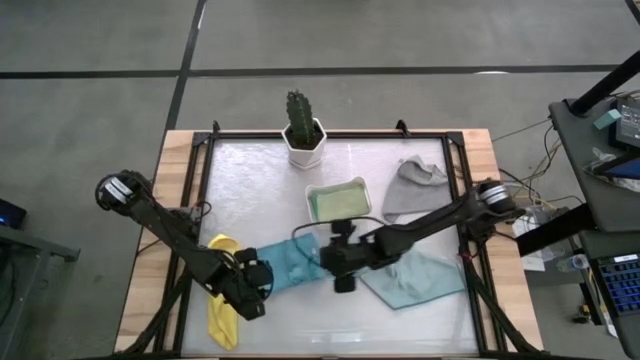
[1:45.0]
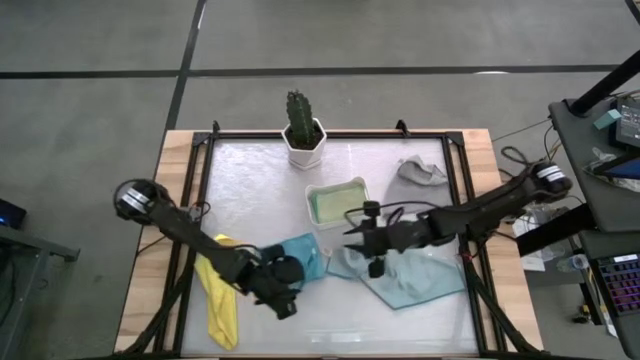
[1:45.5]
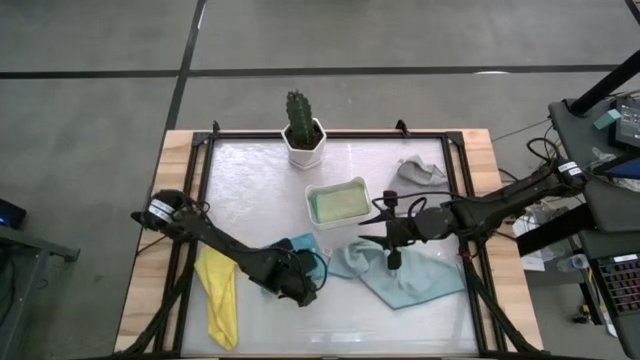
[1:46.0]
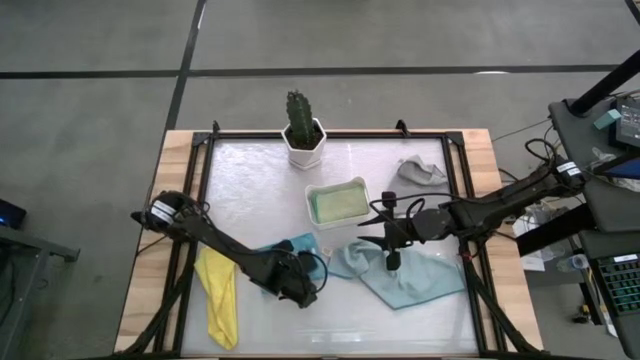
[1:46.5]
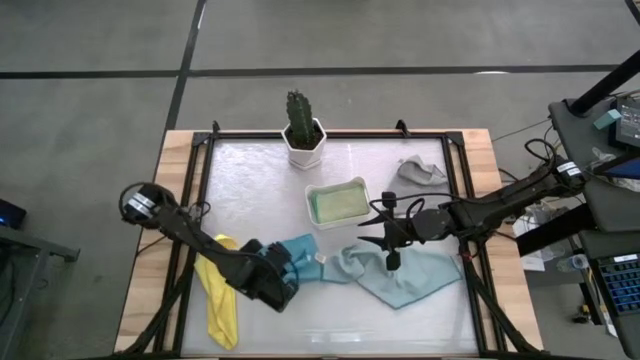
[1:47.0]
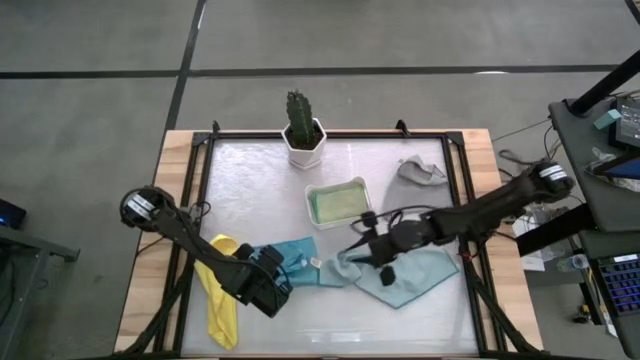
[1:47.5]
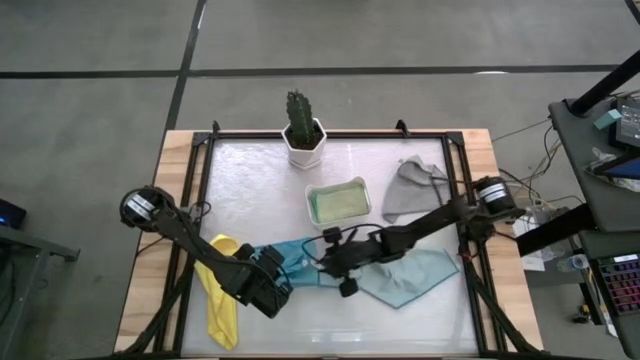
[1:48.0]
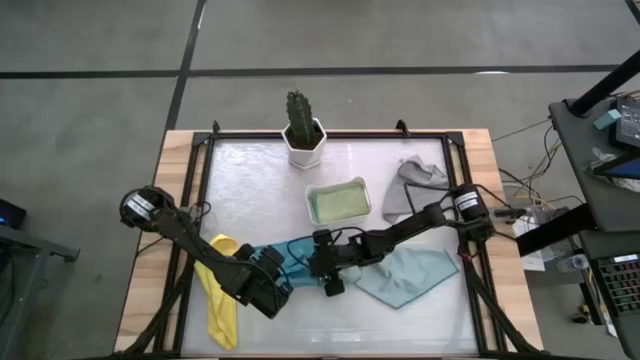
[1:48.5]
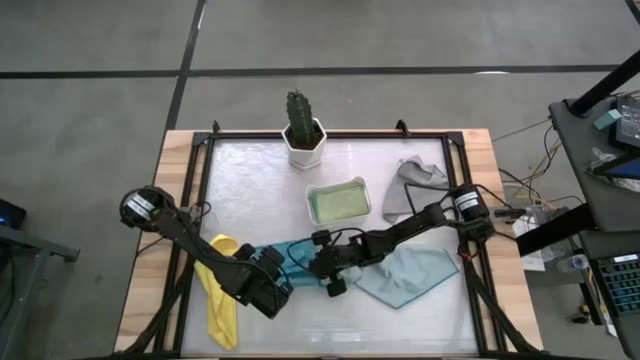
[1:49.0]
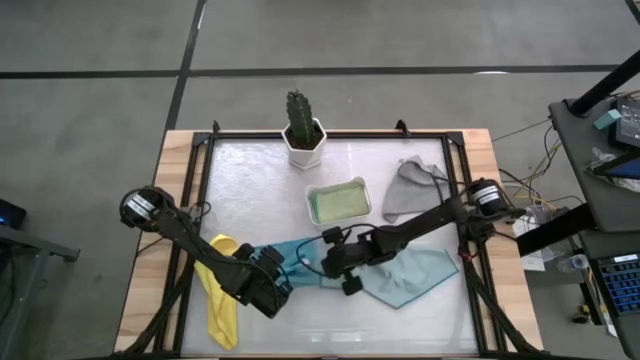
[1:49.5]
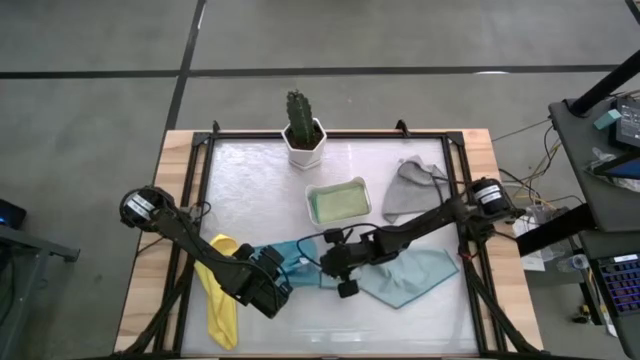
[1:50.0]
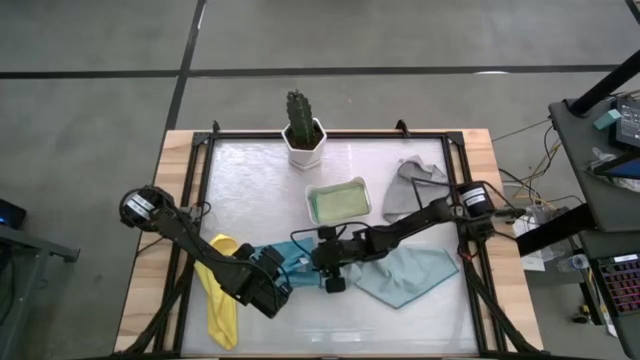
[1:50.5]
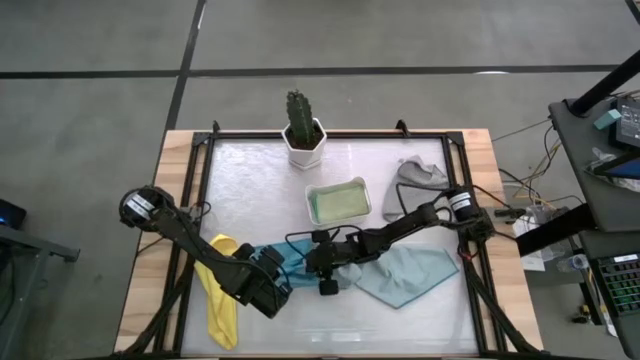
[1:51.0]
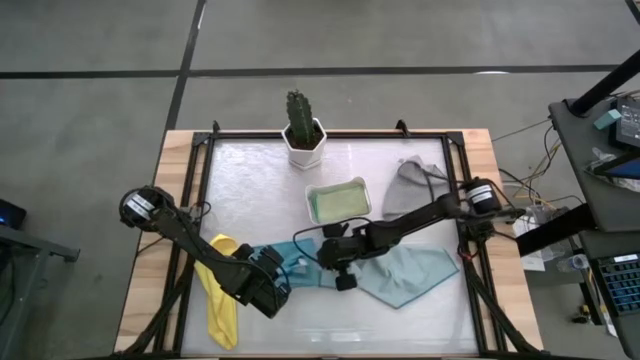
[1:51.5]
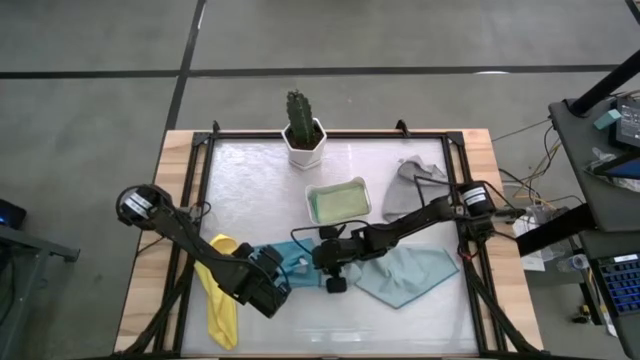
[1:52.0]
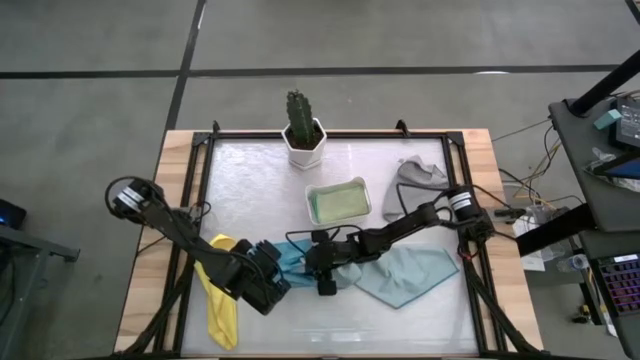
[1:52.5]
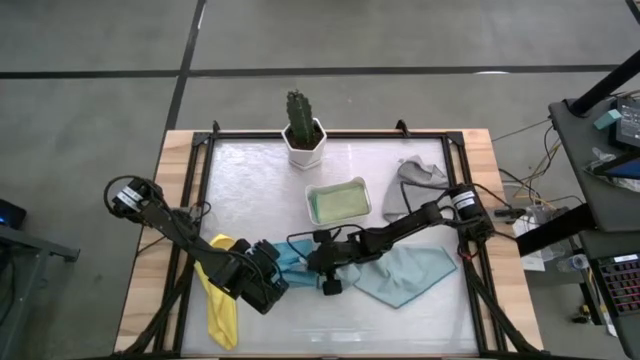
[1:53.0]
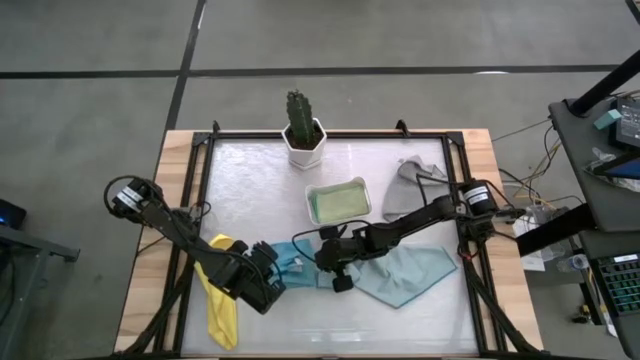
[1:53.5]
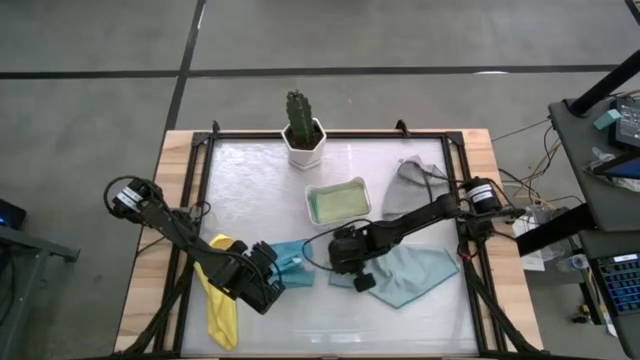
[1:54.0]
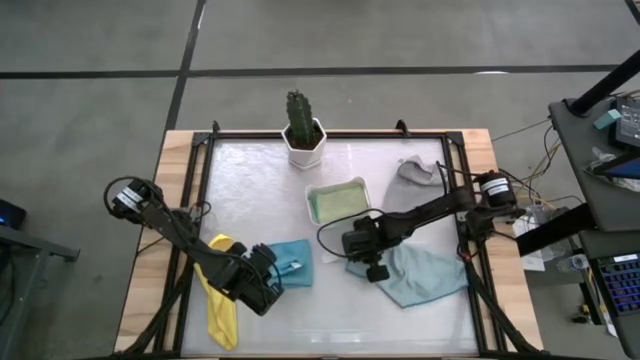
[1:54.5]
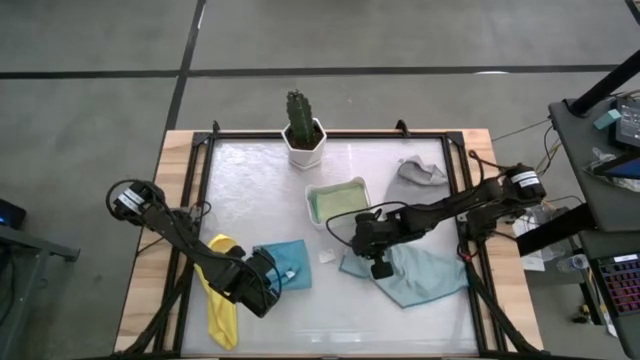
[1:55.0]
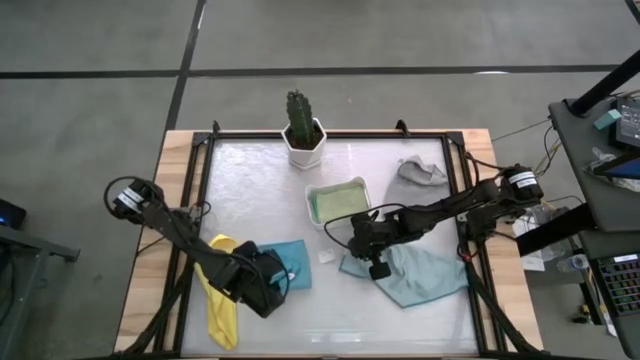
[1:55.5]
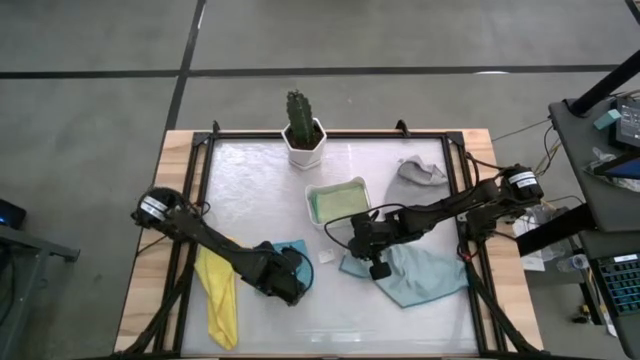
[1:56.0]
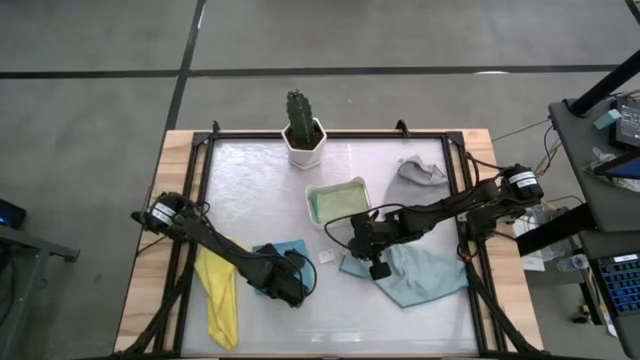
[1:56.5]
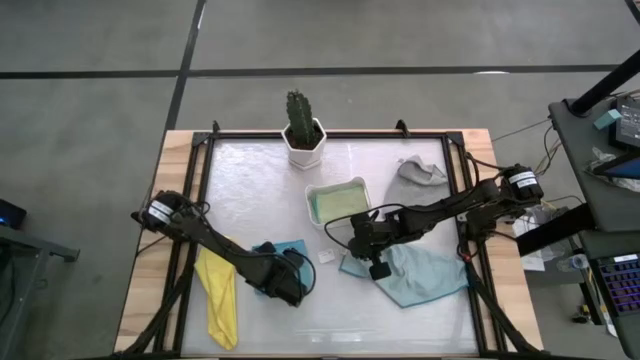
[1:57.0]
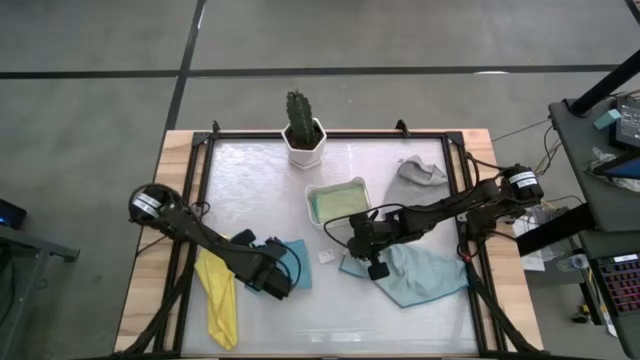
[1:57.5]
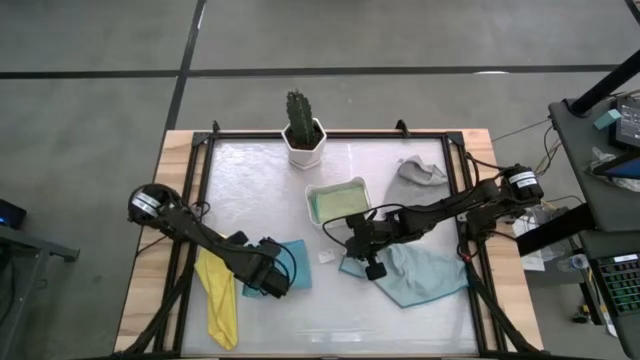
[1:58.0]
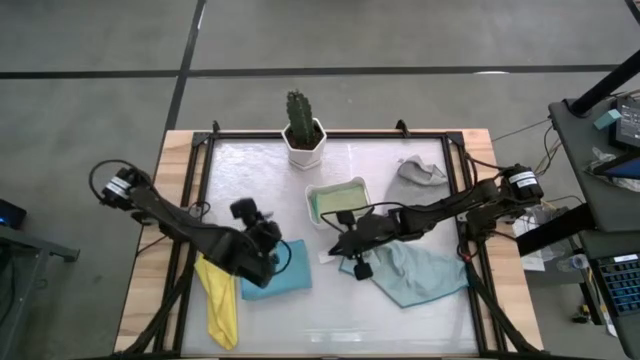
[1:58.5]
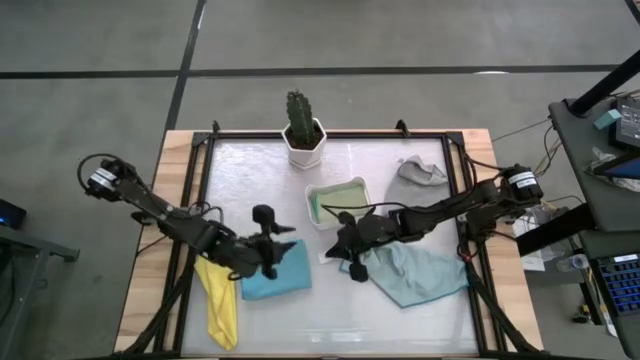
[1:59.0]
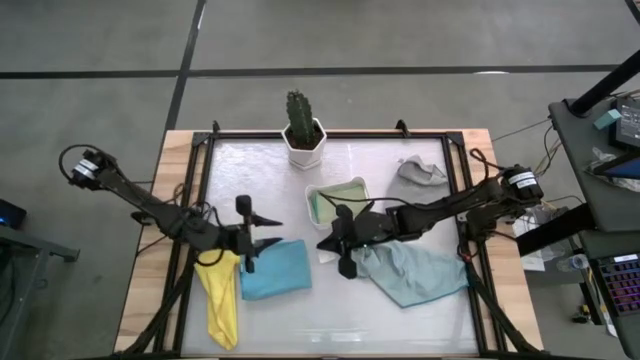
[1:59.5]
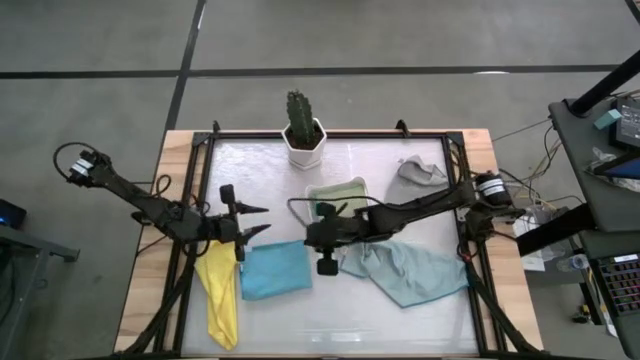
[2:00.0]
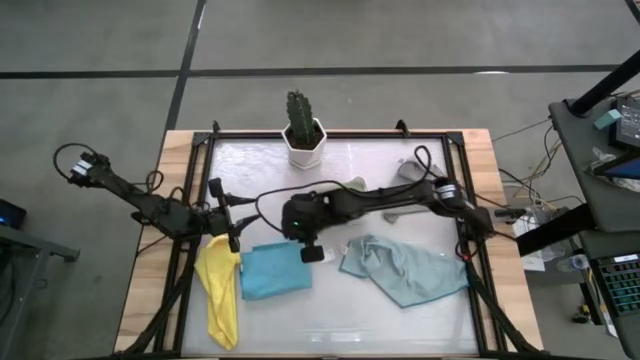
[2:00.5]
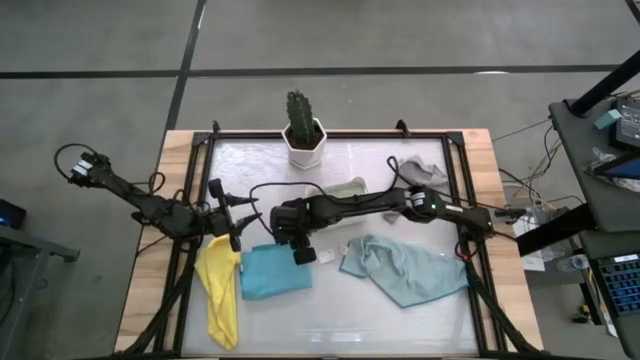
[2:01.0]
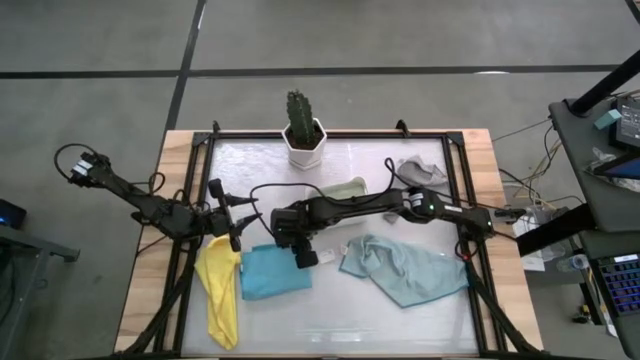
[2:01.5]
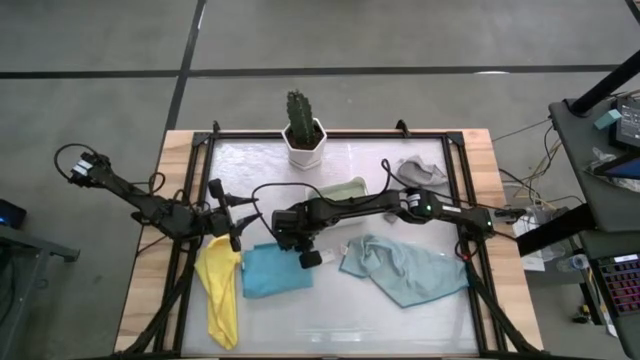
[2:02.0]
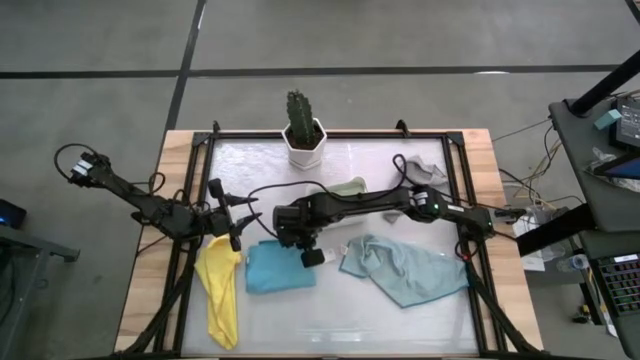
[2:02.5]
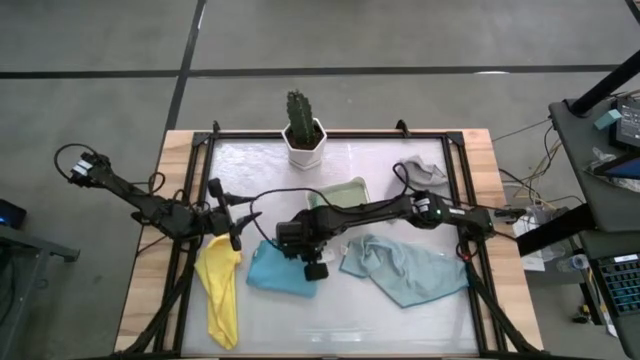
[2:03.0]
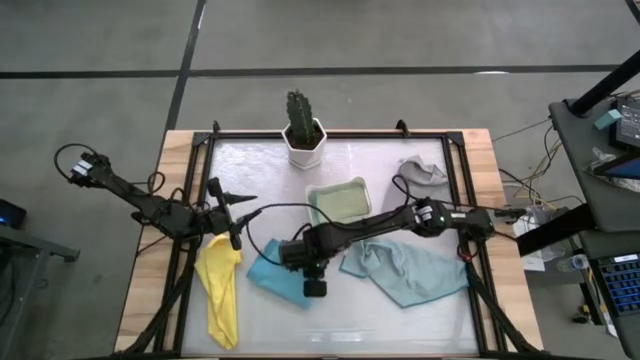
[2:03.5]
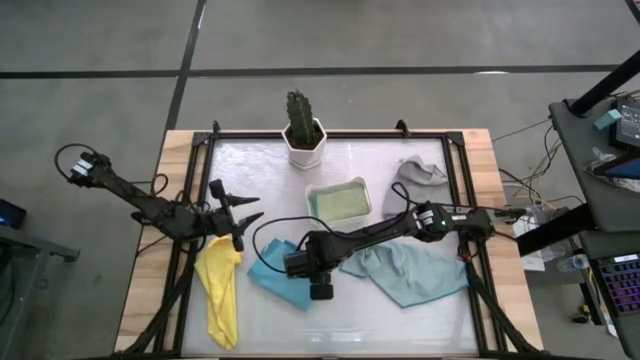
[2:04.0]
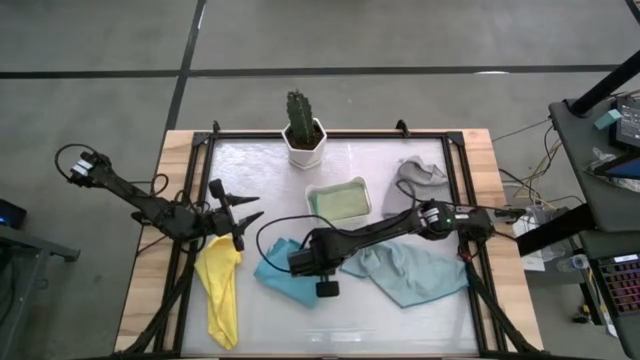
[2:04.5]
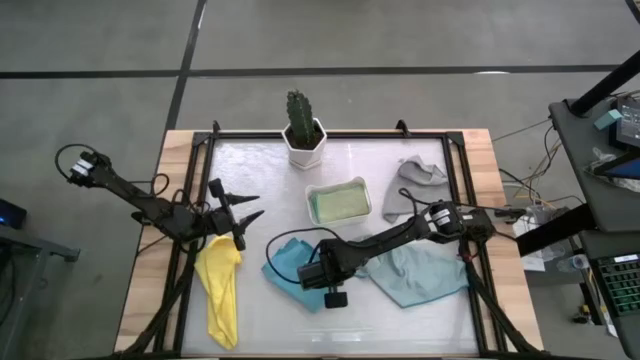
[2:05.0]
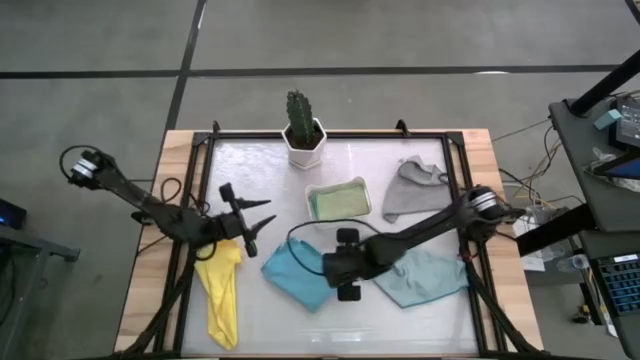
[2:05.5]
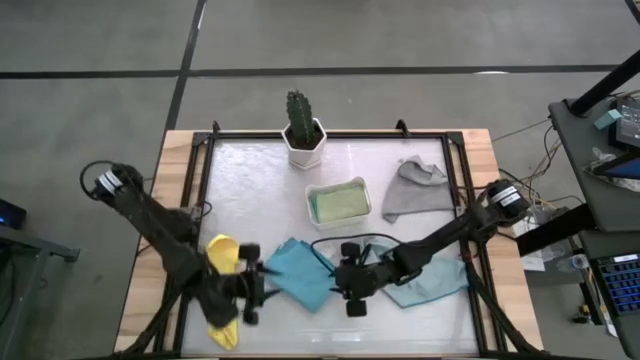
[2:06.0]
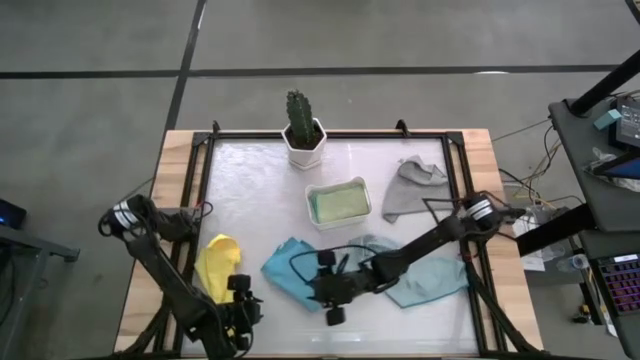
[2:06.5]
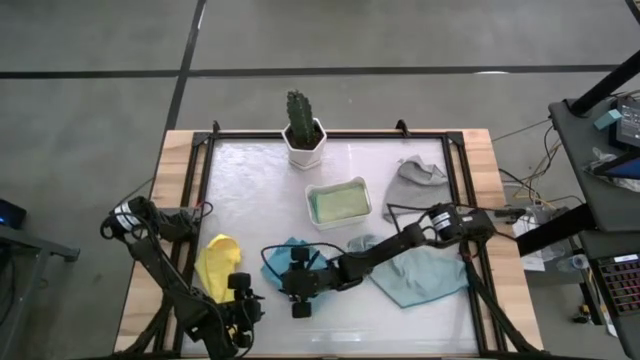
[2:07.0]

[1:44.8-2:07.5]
Task: Fold microfiber towels
Fold the dark blue towel
